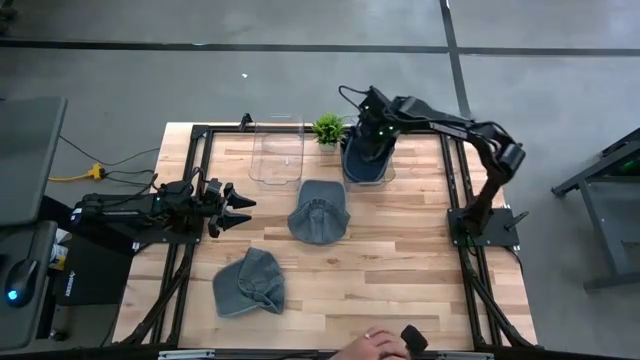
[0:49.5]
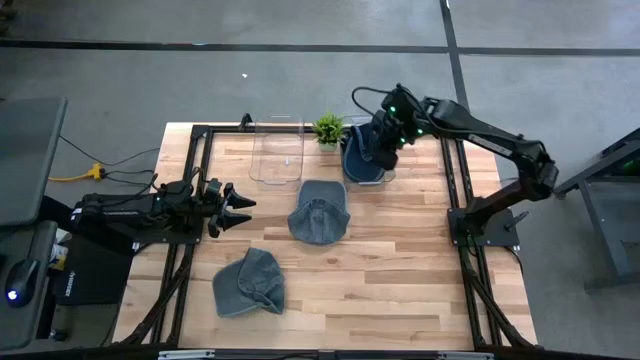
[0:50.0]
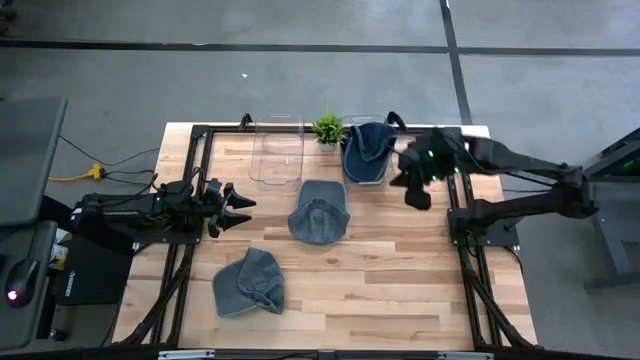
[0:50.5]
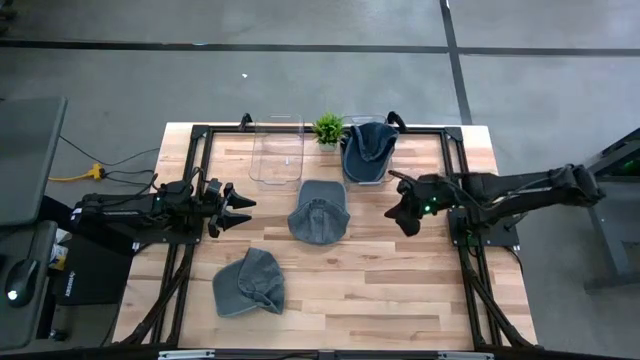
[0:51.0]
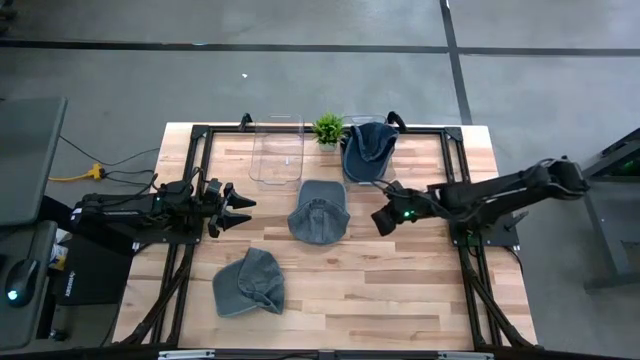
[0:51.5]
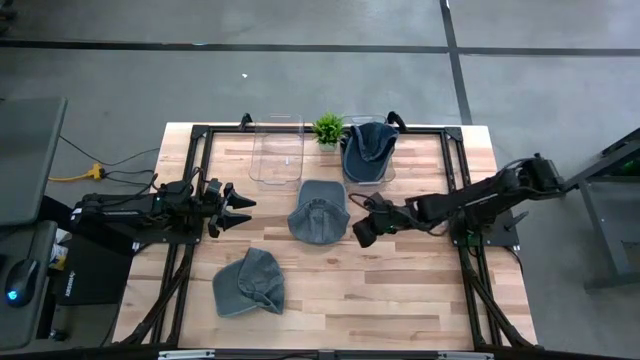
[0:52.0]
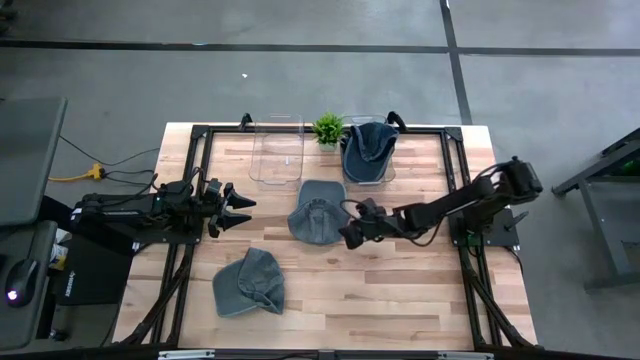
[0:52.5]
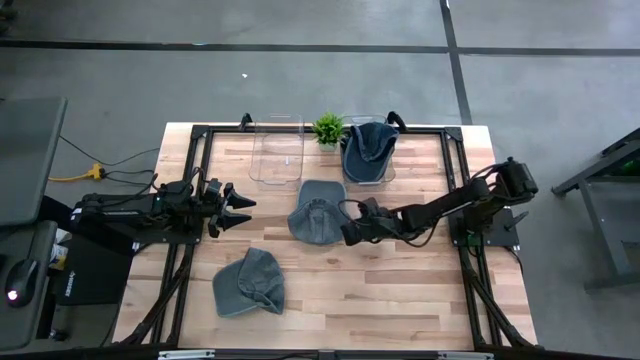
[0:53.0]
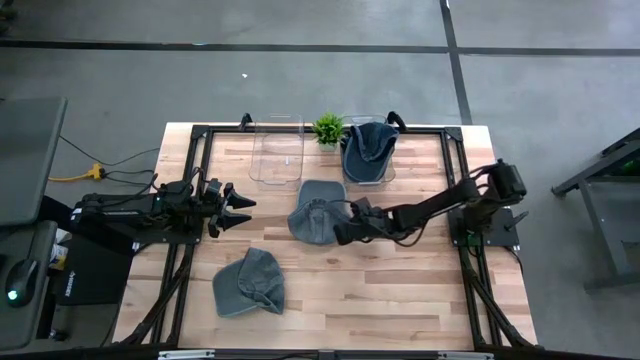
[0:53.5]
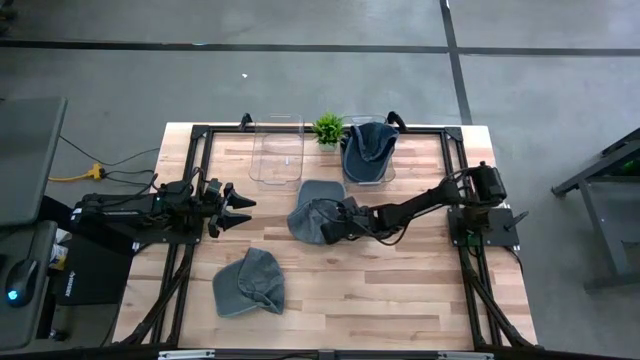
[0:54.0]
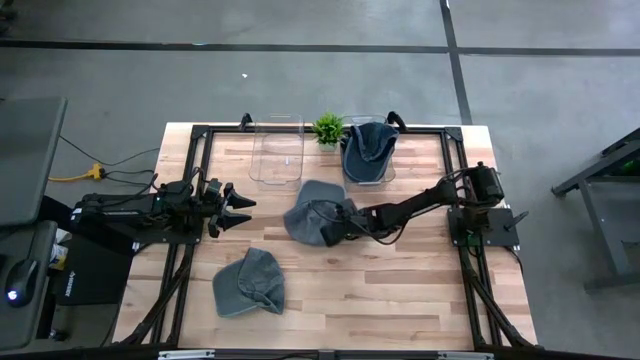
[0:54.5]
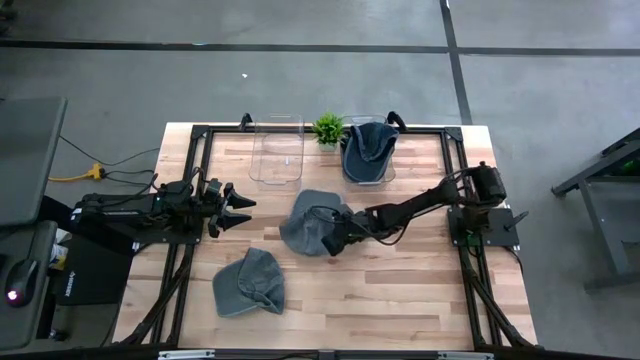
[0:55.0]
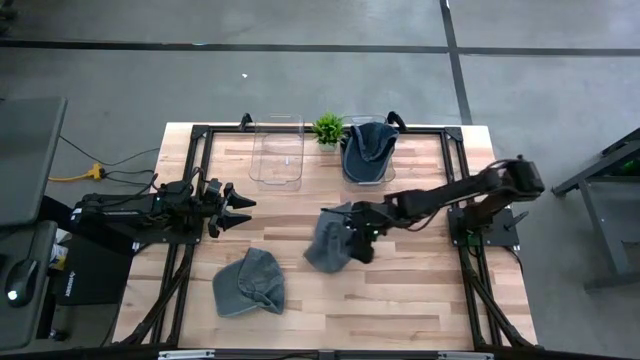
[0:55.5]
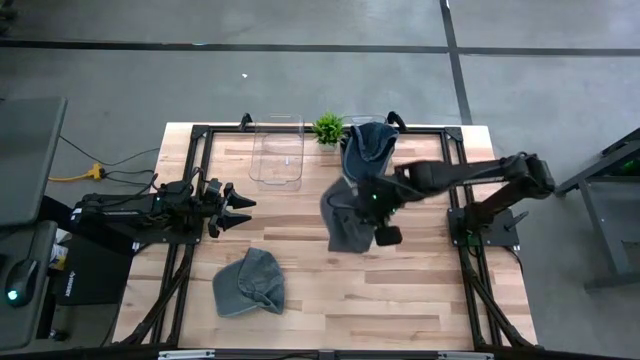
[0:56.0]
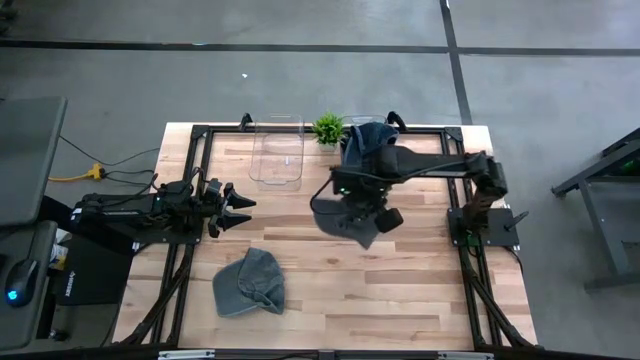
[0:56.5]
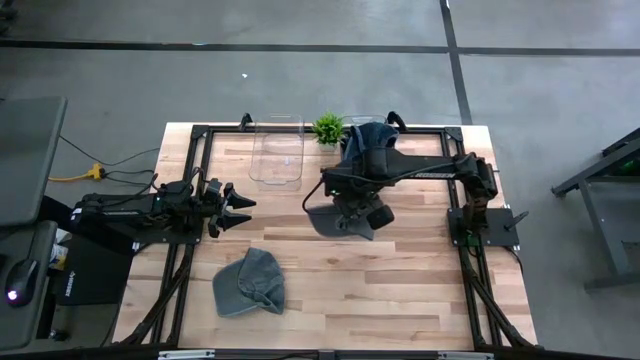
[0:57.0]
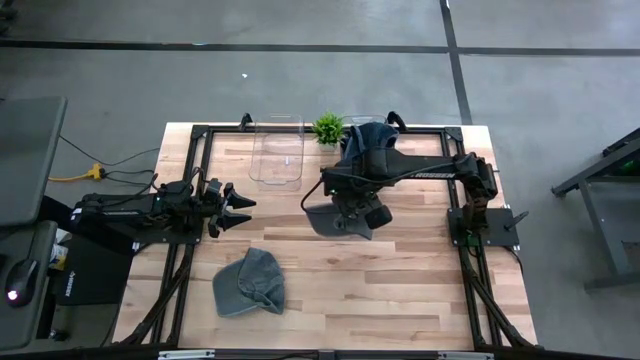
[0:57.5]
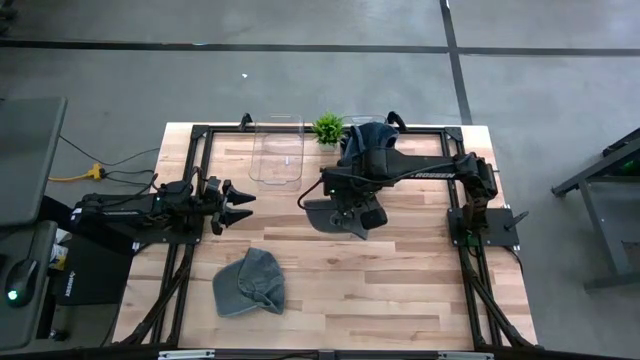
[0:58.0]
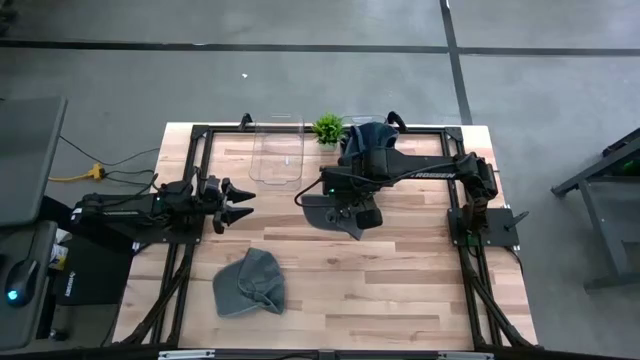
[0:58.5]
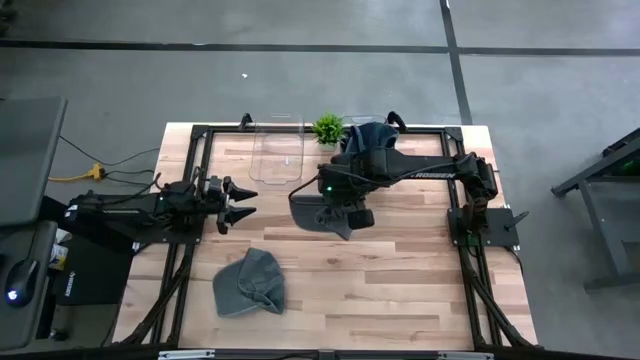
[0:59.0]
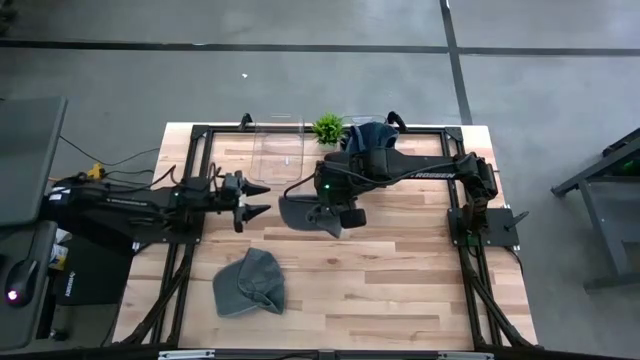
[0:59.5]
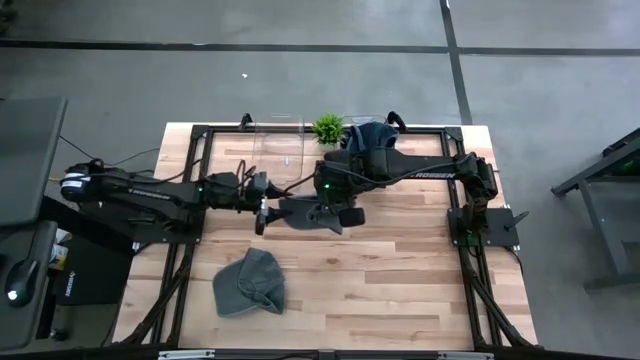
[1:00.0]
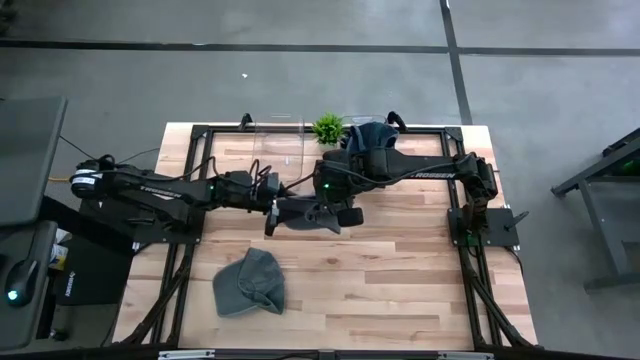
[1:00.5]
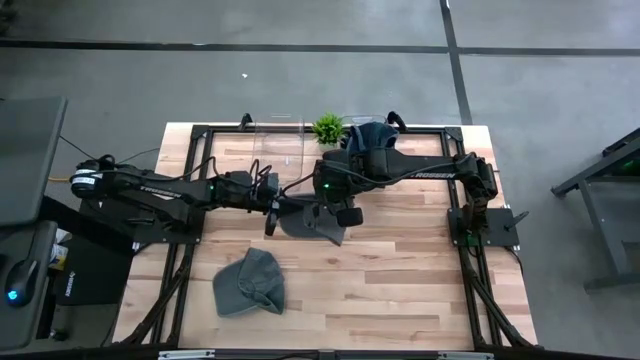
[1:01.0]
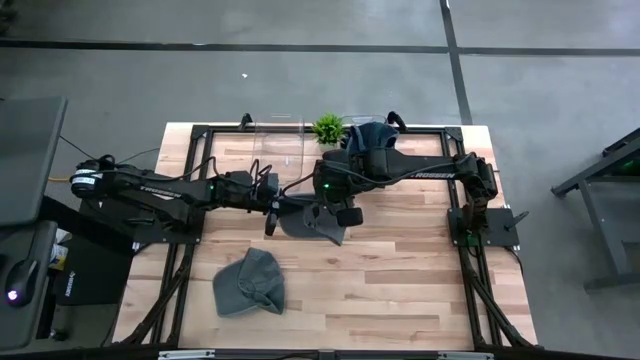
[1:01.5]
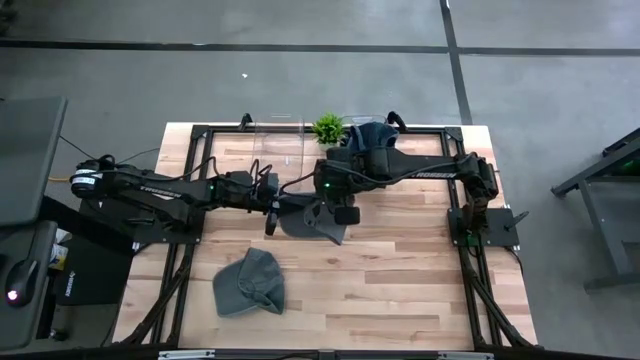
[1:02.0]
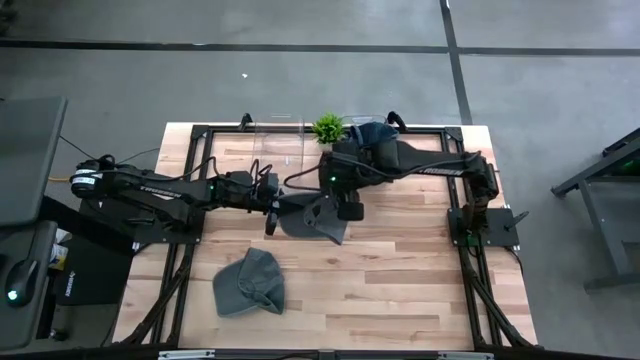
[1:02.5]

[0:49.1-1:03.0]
Task: Pick & Place hat
Put the top gray cap into the left transparent bin

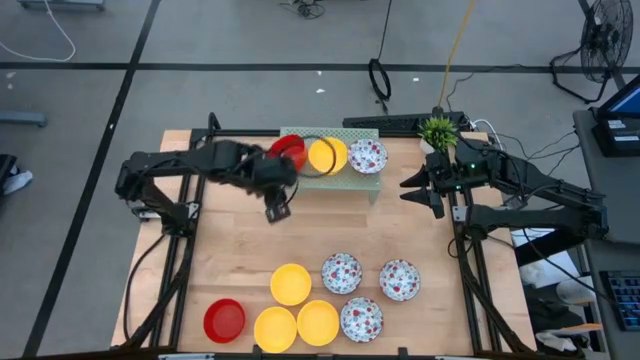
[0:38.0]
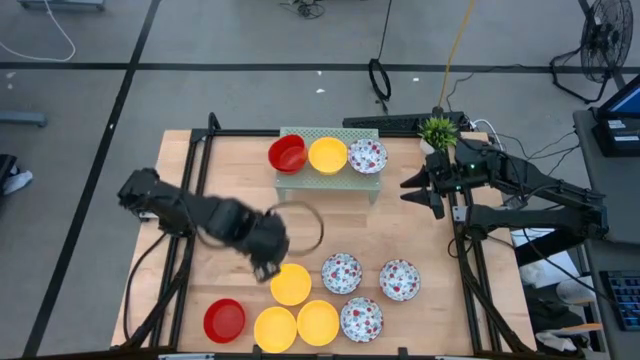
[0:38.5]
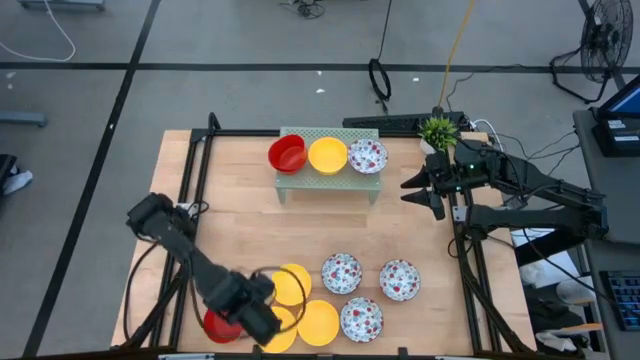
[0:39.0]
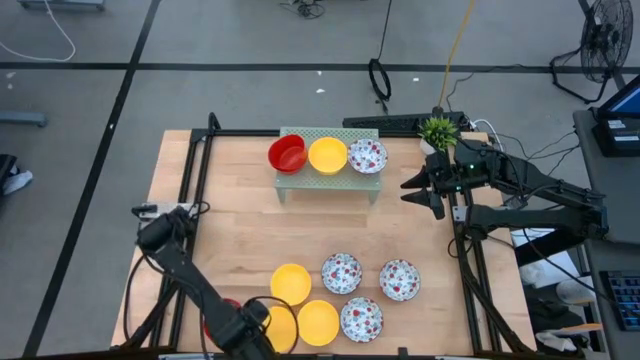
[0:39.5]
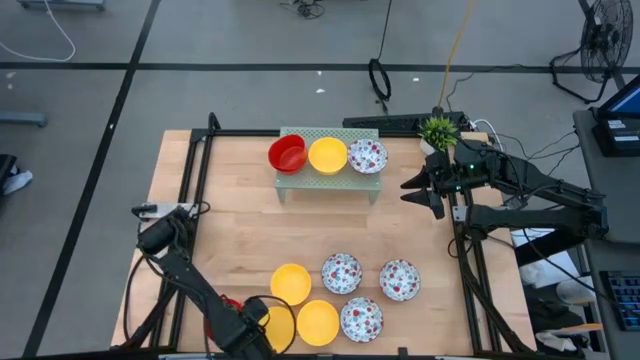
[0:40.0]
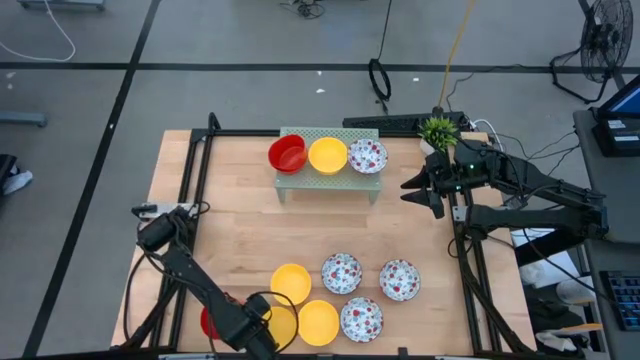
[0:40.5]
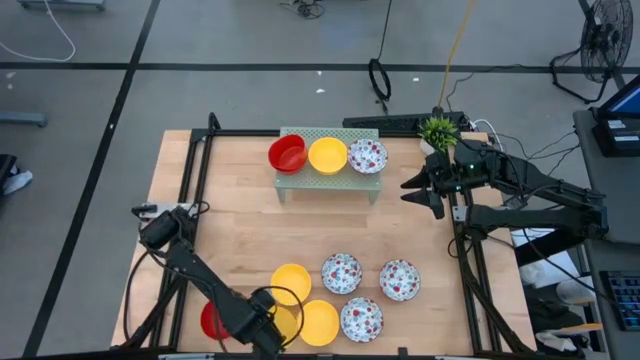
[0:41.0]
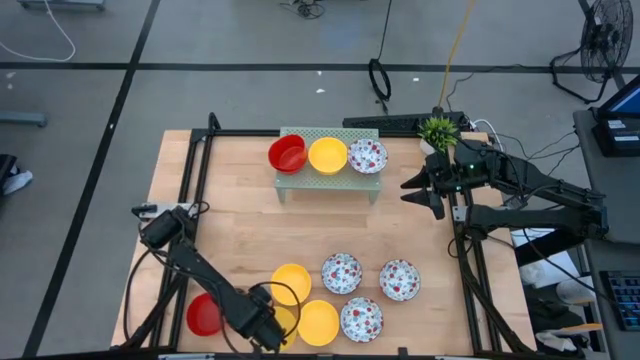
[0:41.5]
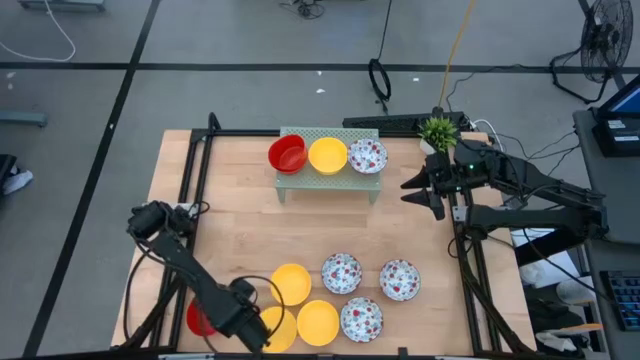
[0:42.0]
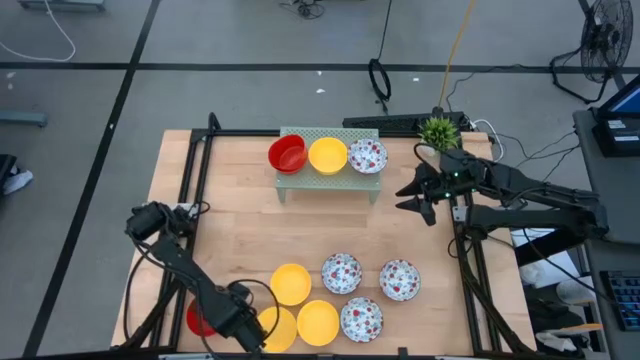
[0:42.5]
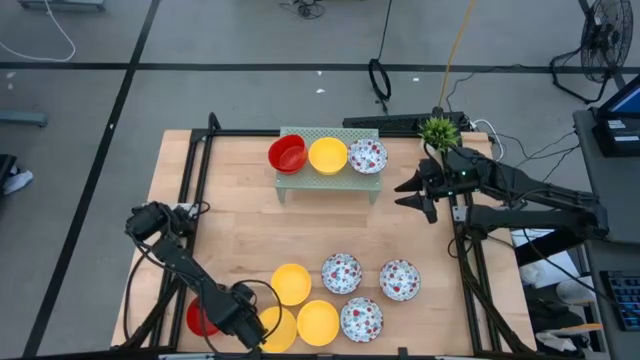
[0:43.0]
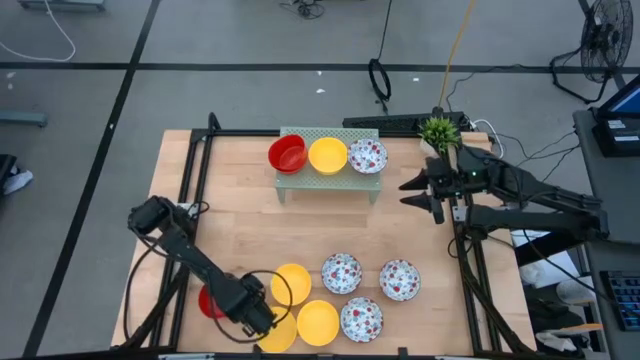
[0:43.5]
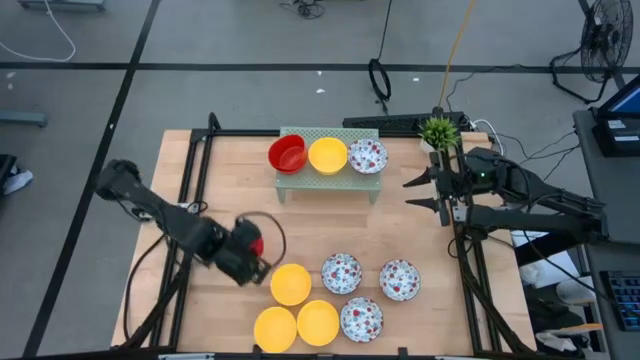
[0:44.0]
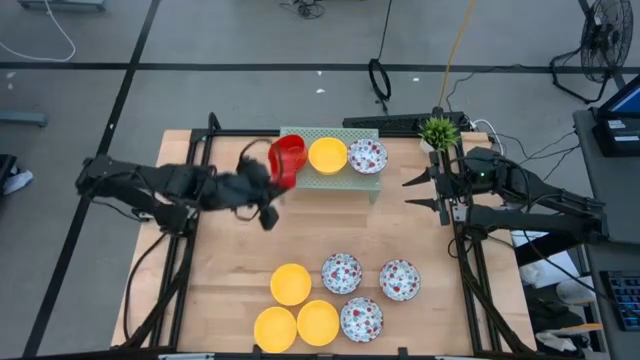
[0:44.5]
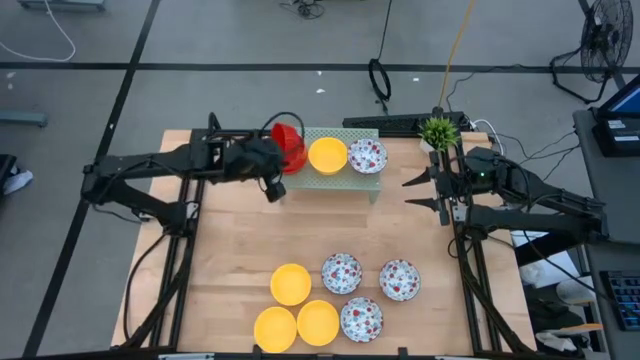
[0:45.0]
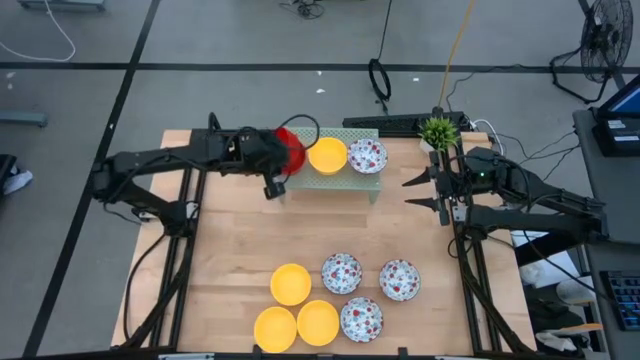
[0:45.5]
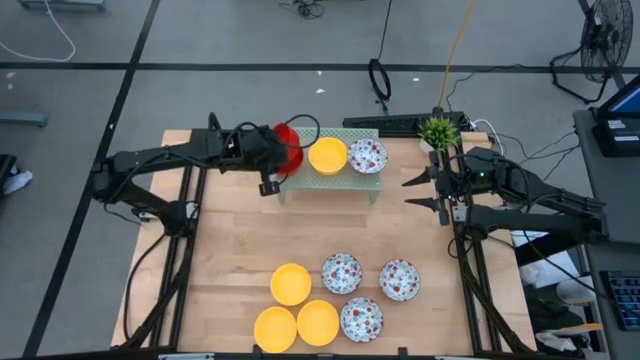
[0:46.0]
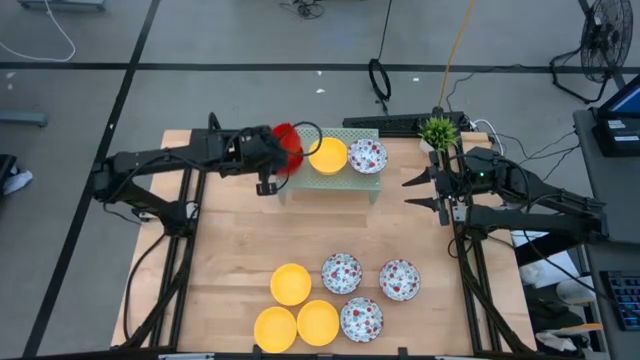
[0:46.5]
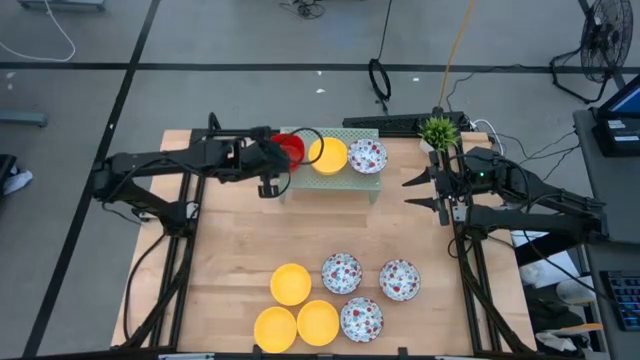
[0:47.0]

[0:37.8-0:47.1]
Task: Pick & Place Mini bowls
Stack the red bowl on the red bowl on the shelf
